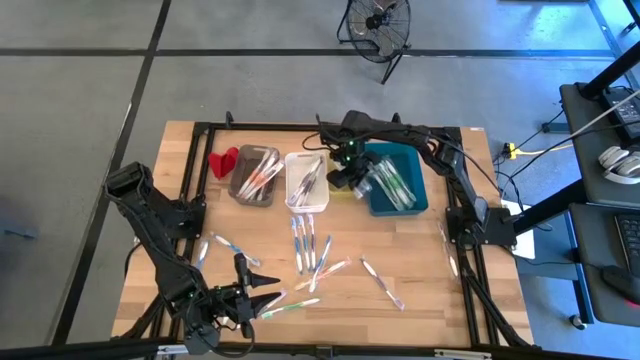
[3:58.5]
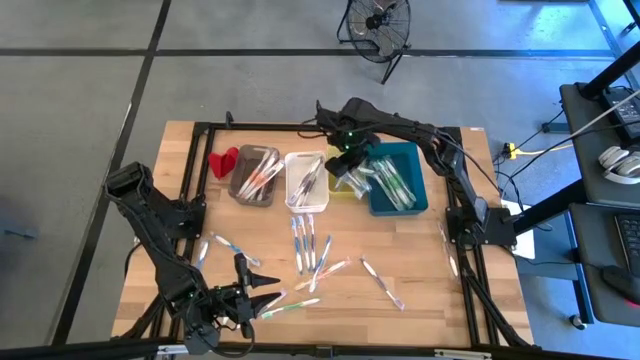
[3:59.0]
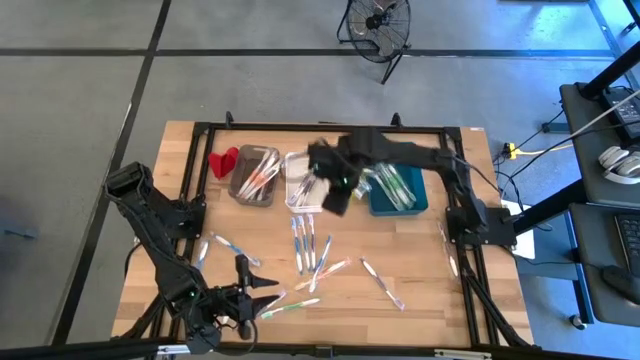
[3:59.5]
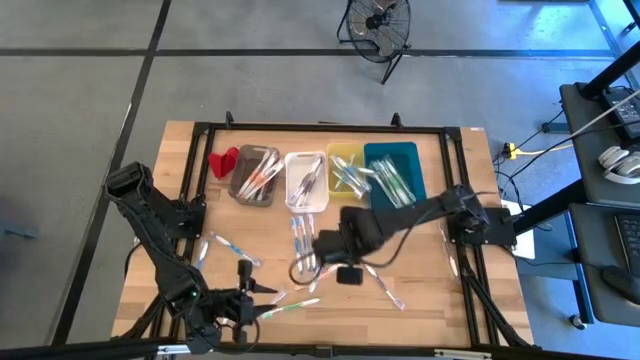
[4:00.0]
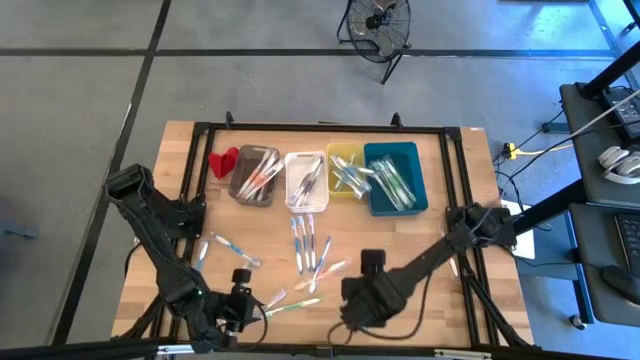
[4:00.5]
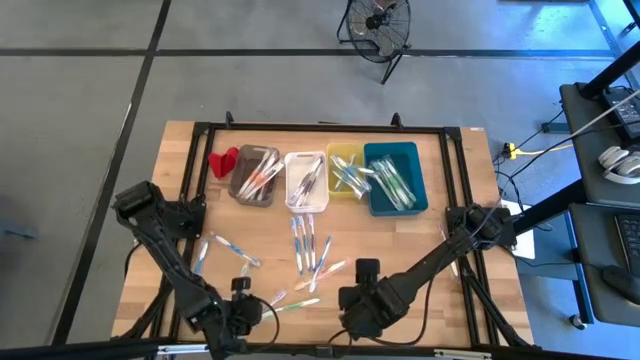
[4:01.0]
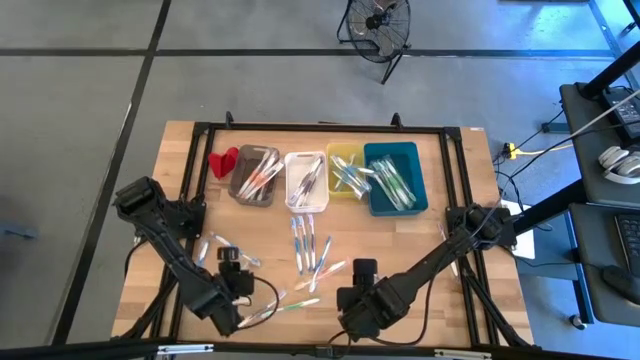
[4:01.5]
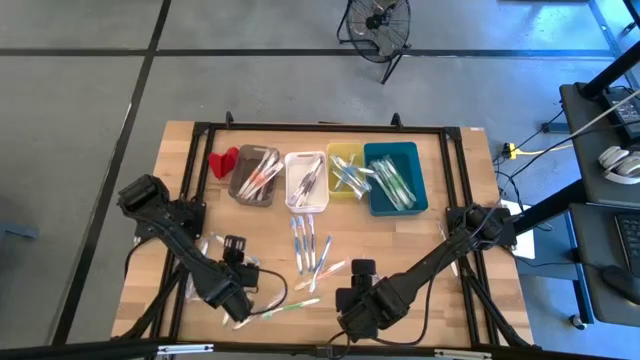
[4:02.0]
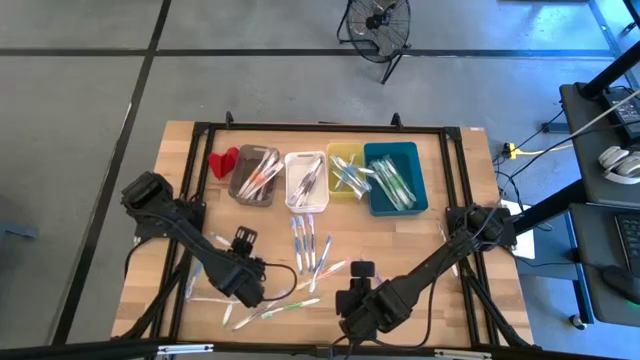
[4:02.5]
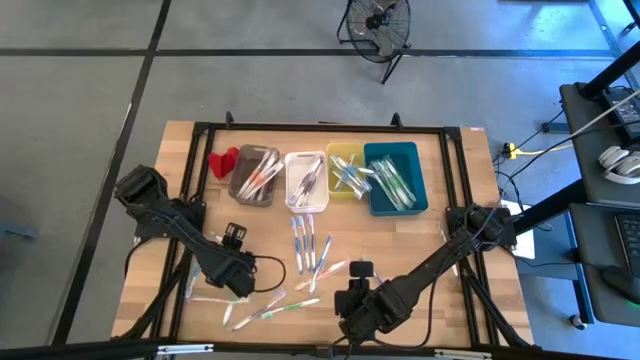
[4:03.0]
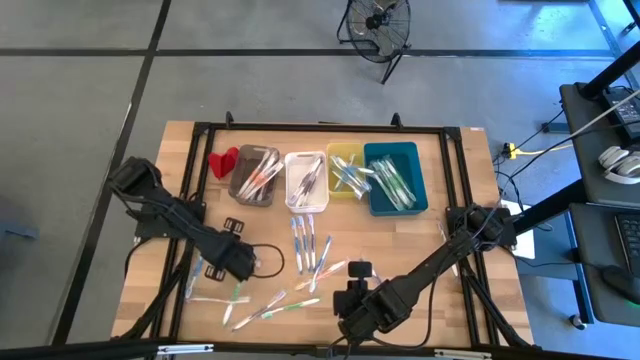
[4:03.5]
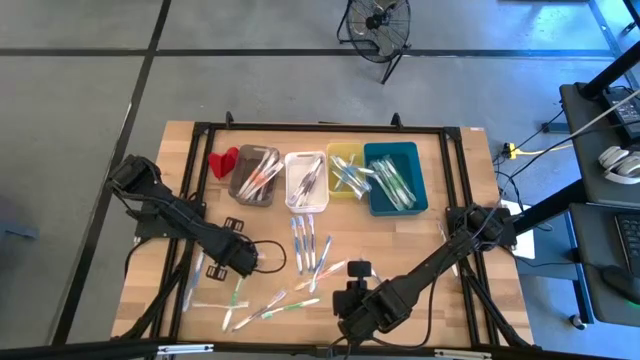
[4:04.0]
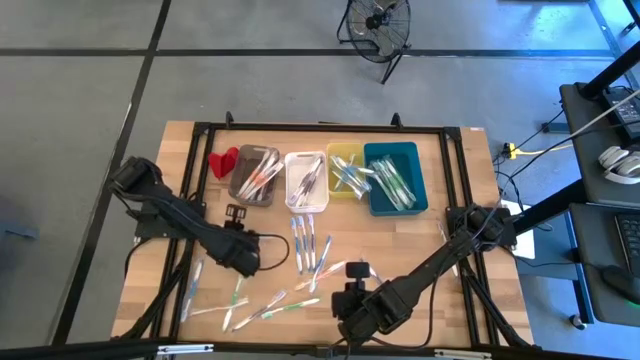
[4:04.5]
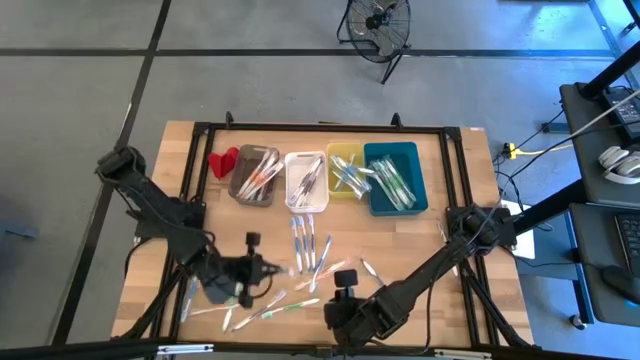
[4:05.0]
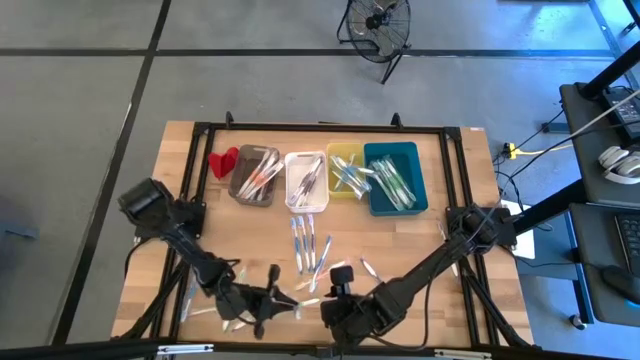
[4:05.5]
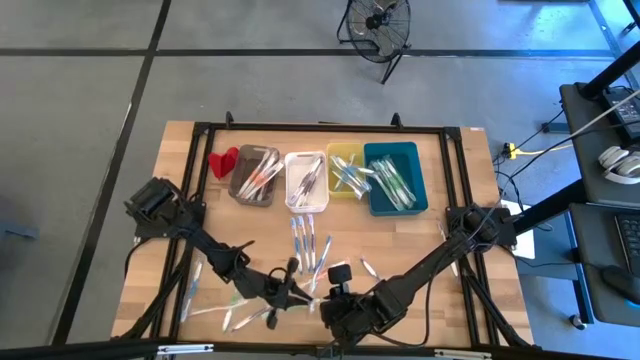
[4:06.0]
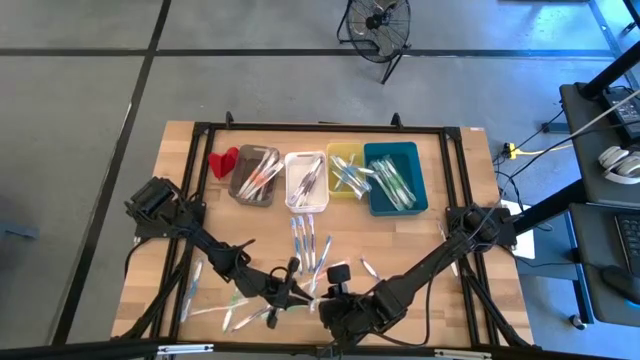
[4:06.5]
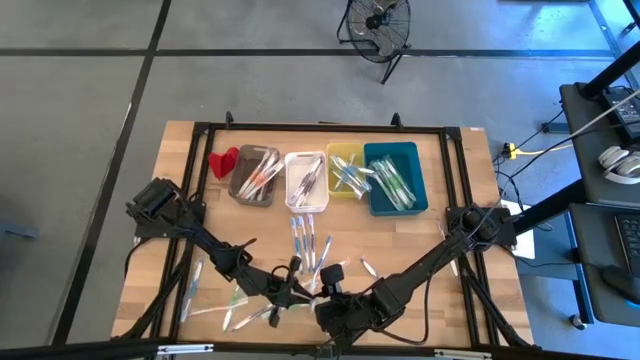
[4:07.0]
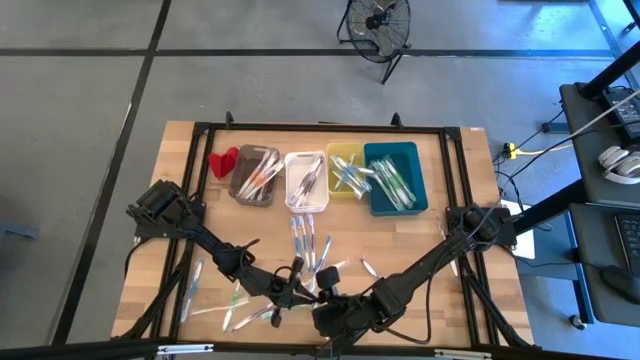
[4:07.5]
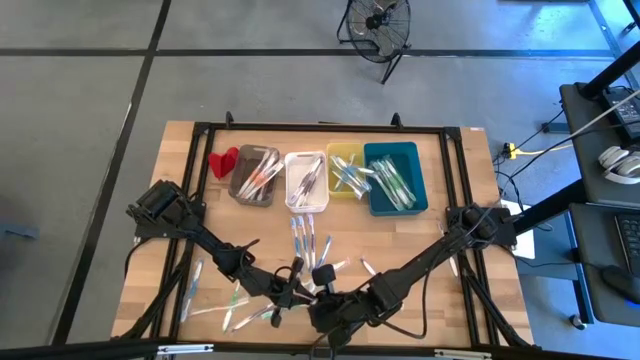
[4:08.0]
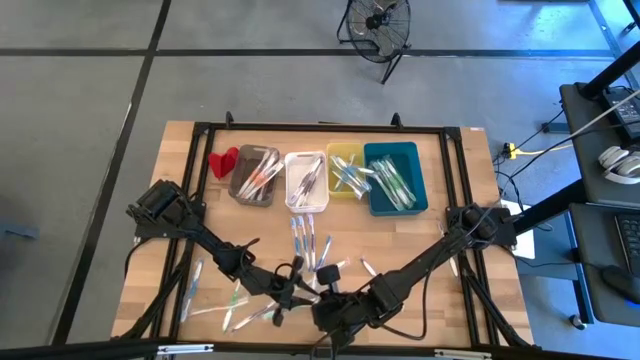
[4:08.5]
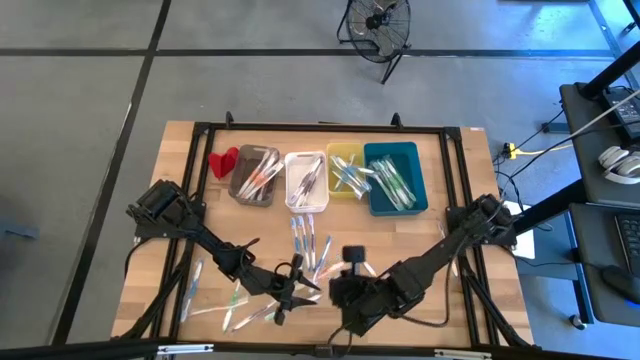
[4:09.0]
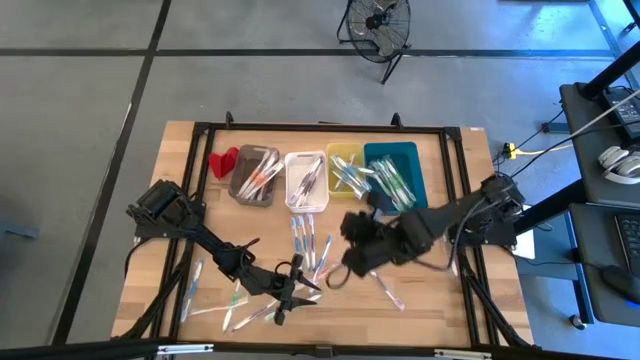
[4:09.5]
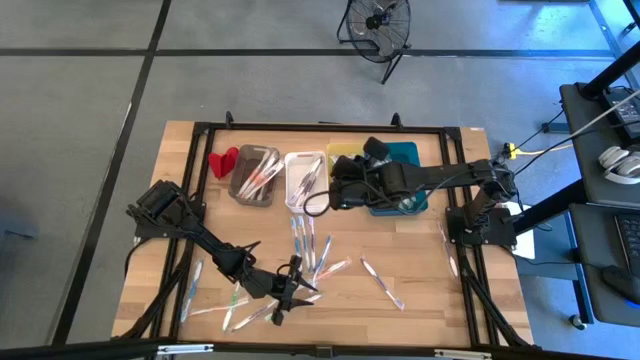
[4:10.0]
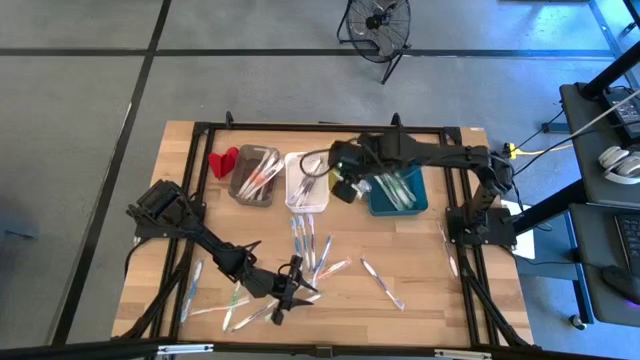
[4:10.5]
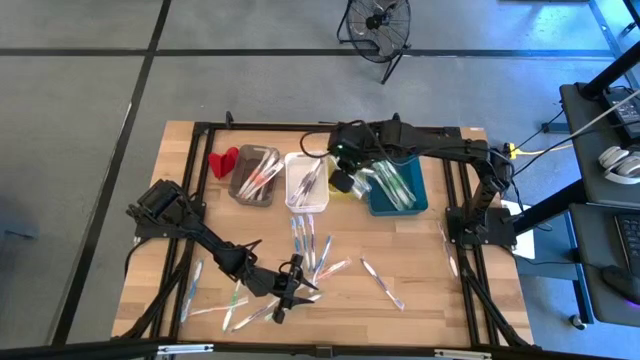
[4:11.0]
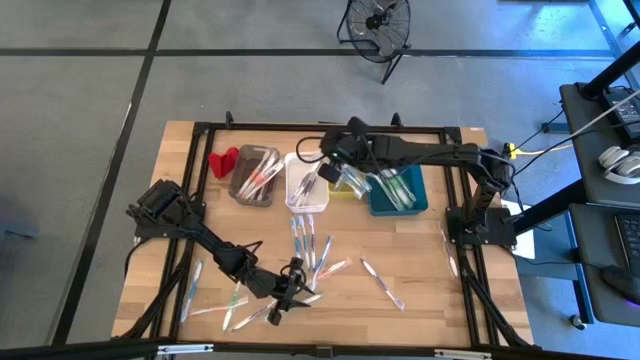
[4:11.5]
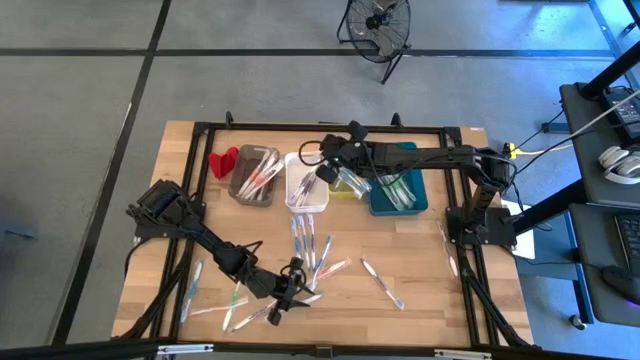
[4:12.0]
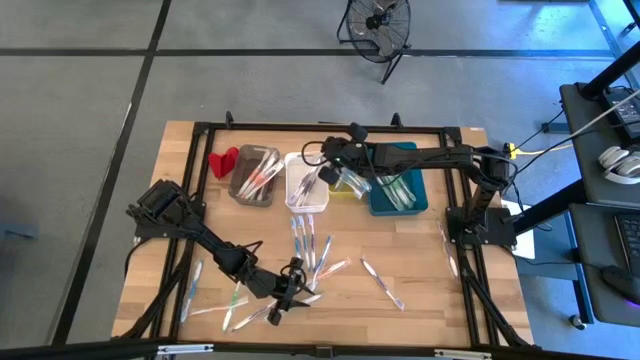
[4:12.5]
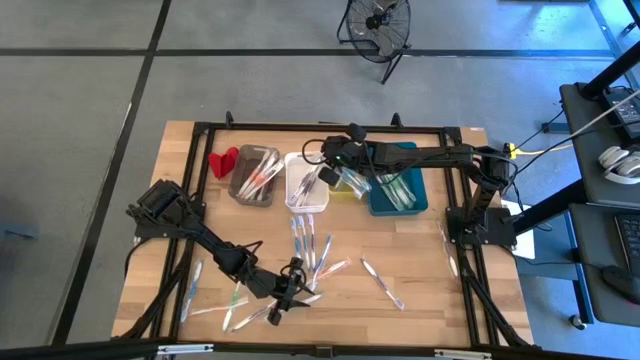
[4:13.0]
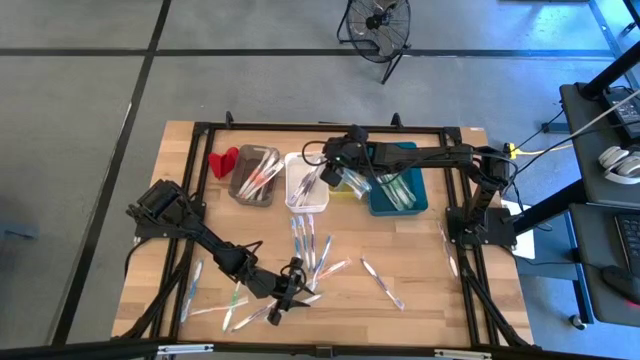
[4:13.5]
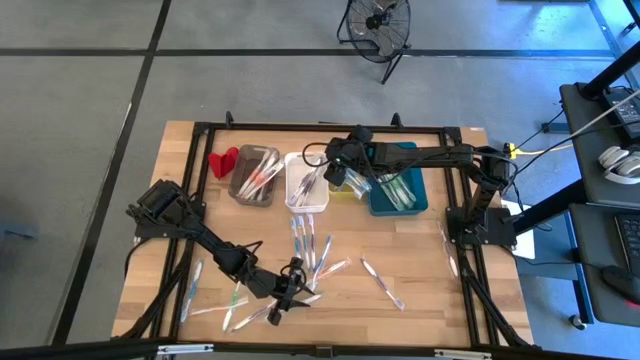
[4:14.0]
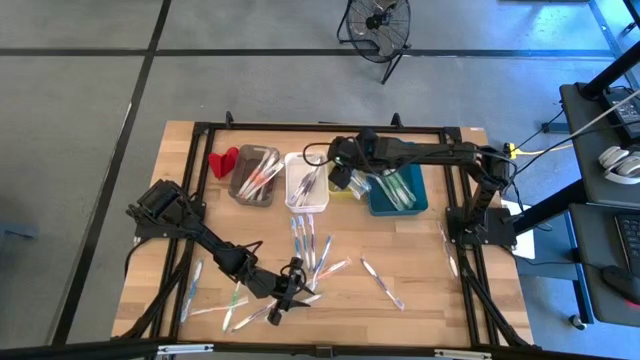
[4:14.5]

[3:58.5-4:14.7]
Task: Pick & Place Toothbrushes
Put the blue toothbrush into the yellow bin

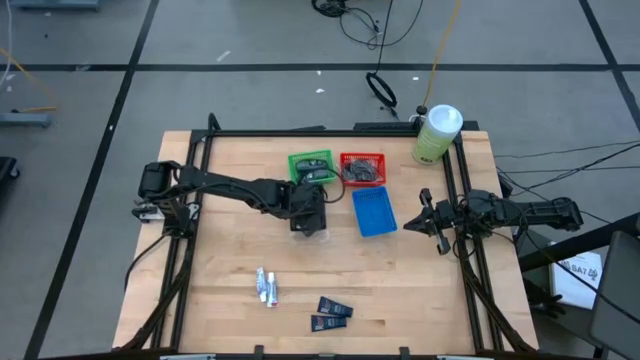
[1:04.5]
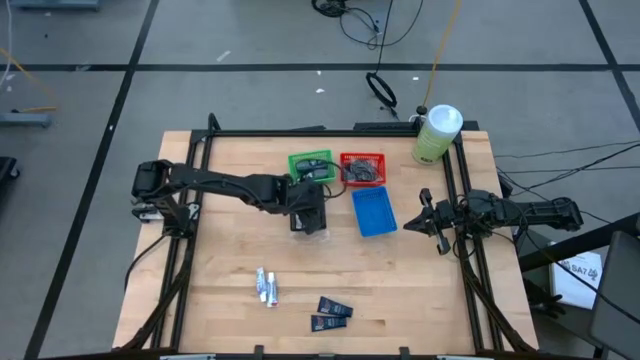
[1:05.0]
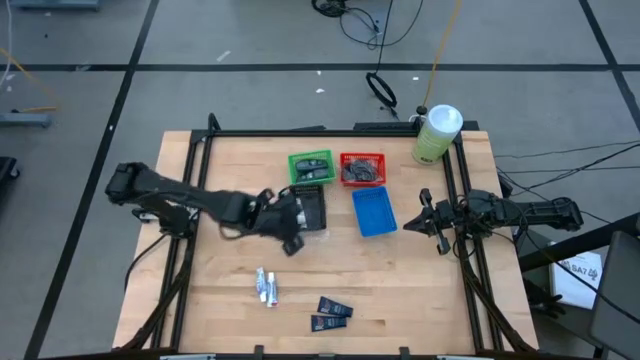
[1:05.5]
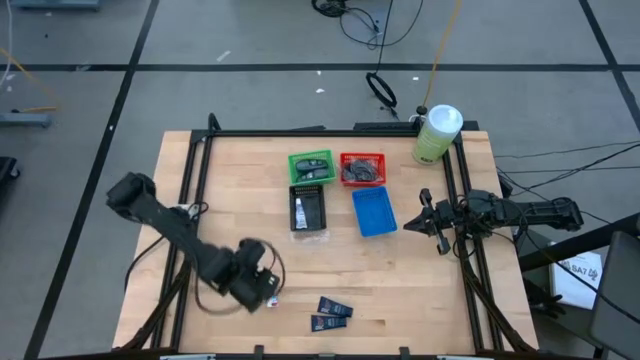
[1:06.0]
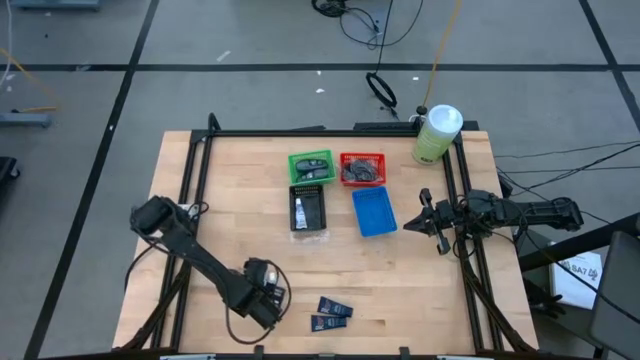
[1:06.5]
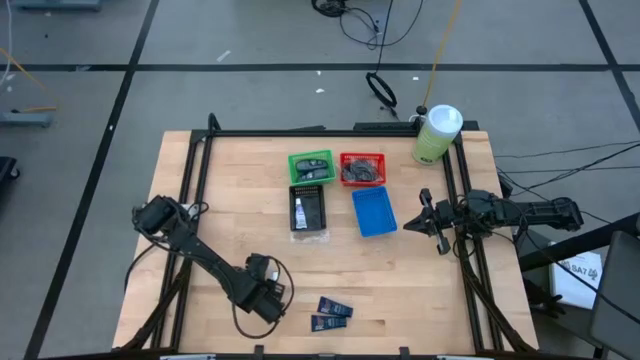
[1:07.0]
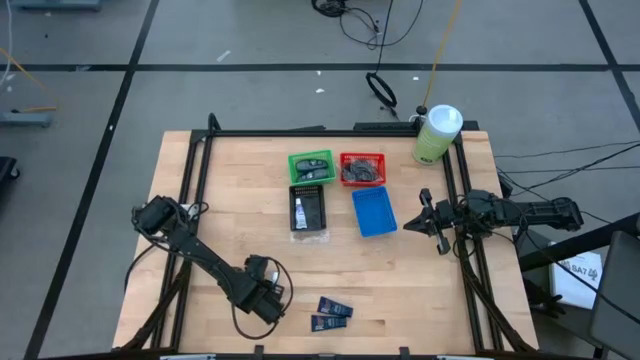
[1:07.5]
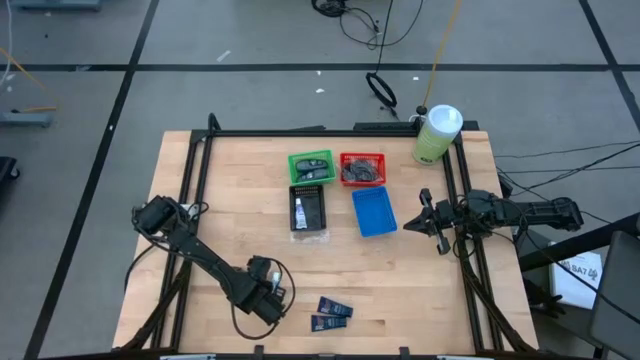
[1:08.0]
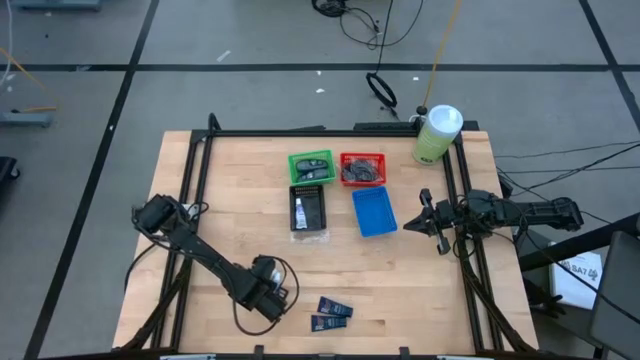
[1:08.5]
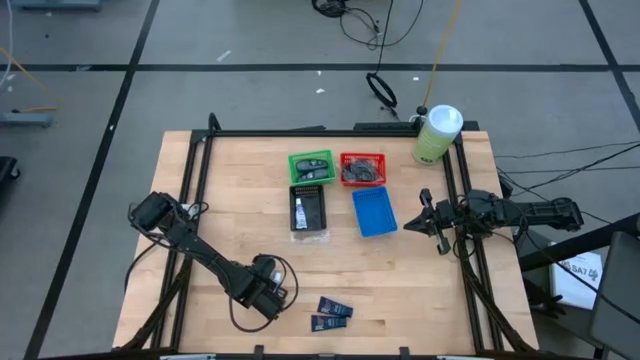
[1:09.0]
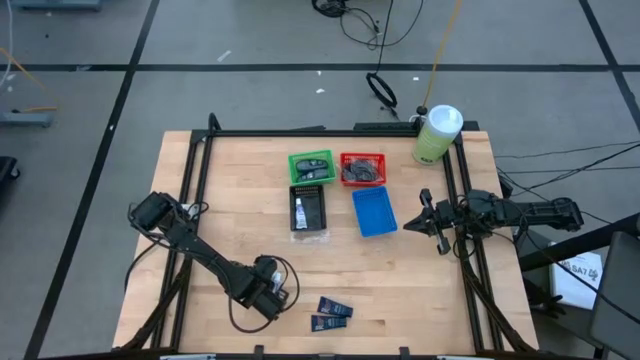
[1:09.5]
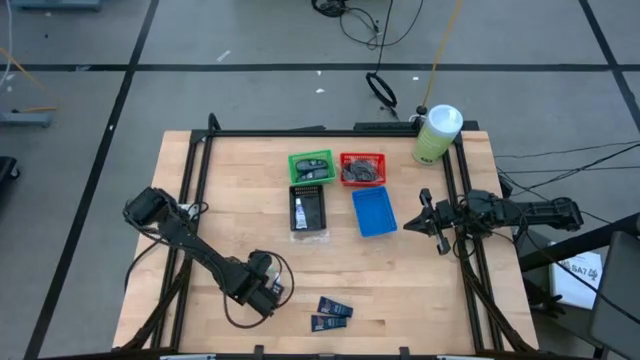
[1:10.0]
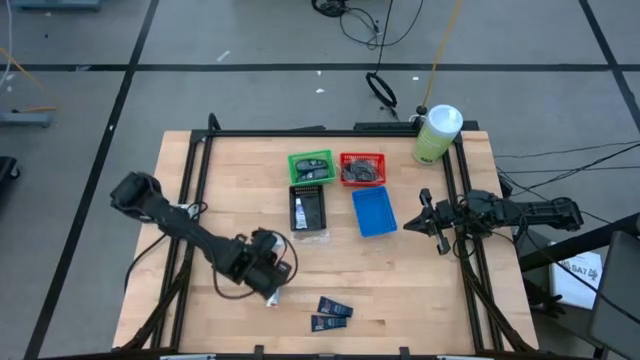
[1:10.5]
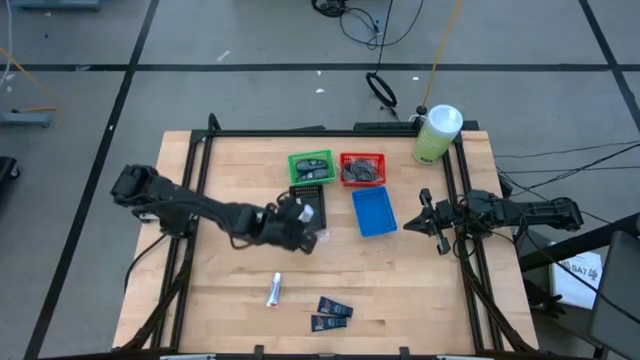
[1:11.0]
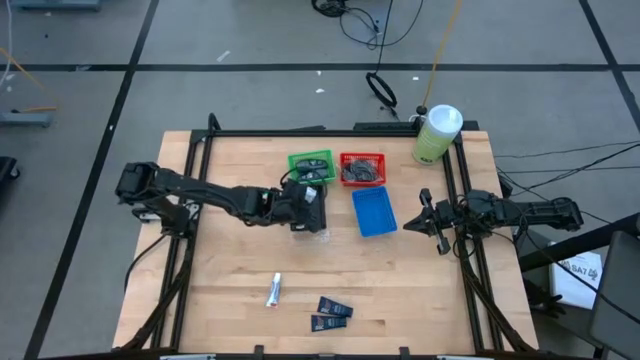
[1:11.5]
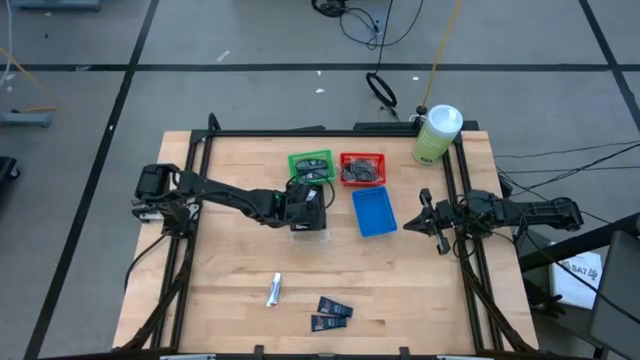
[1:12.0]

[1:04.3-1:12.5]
Task: Pick & Place Travel size toiletries
Put the left white toothpaste into the black bin
